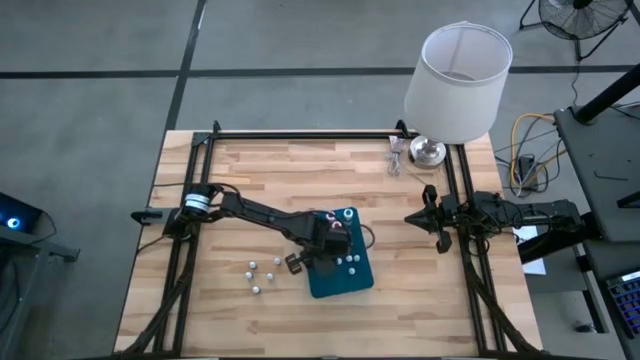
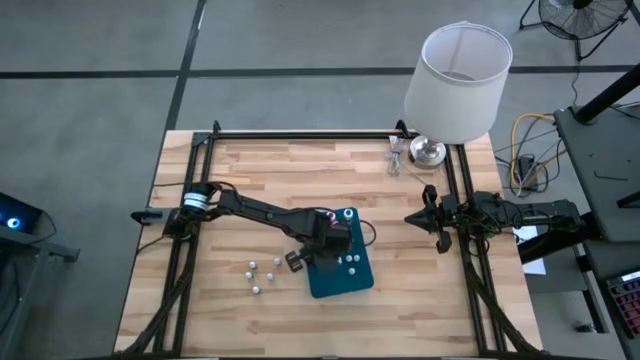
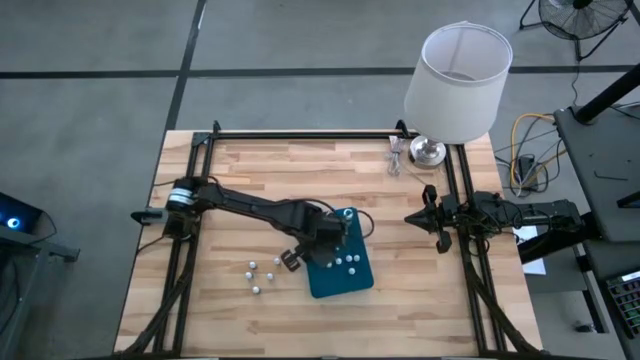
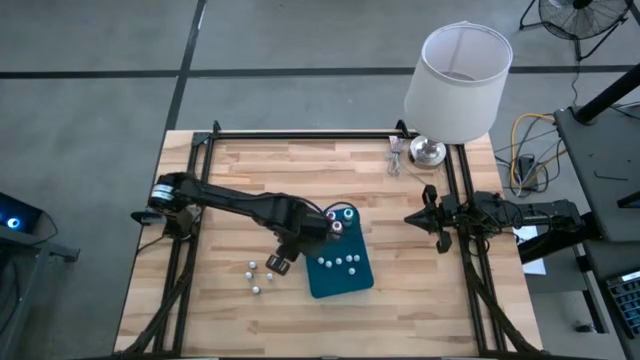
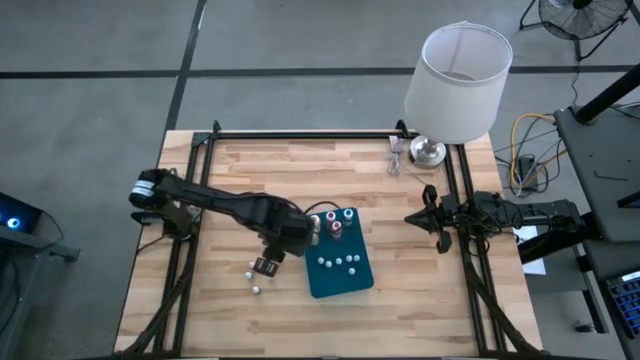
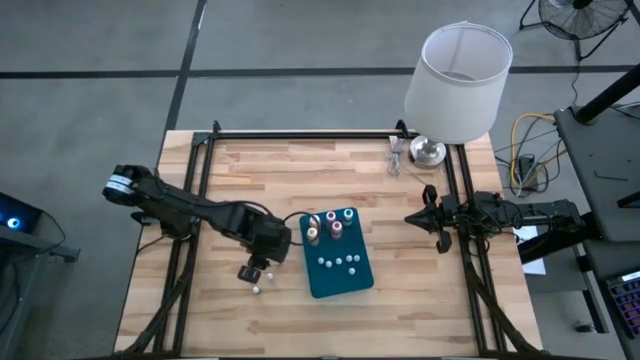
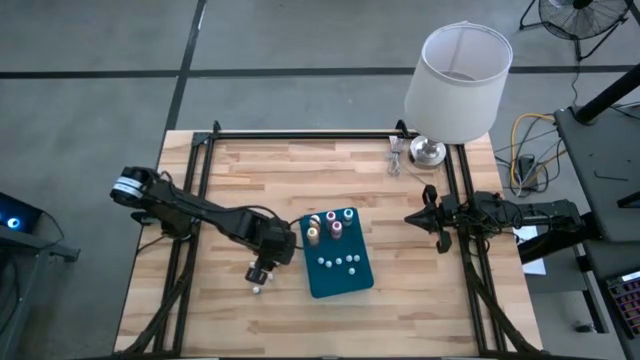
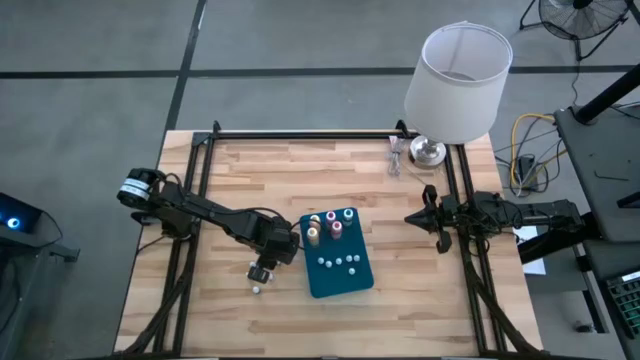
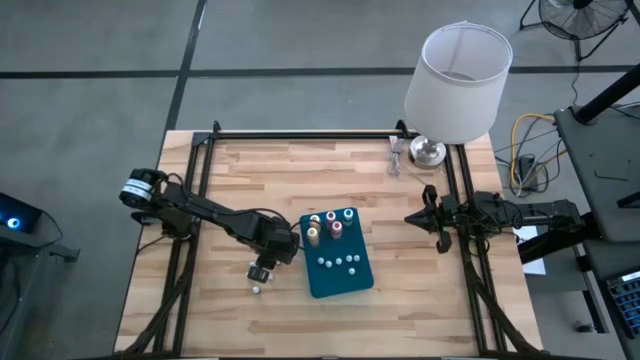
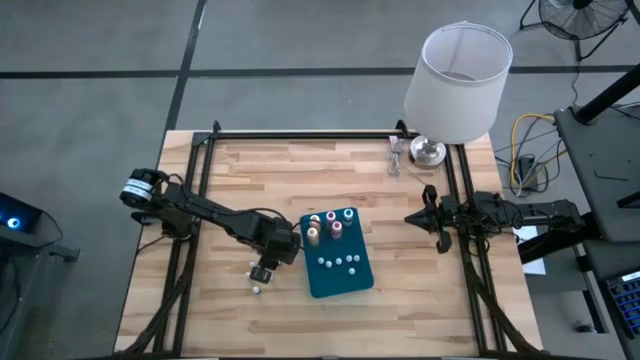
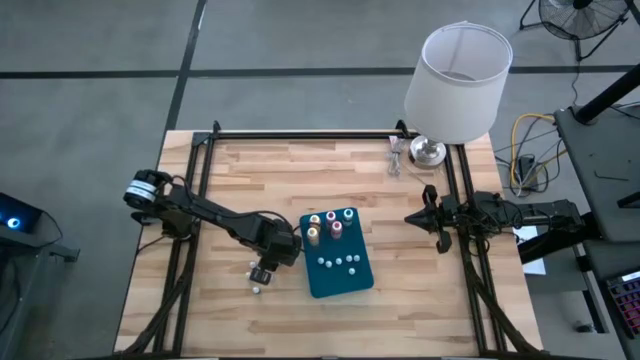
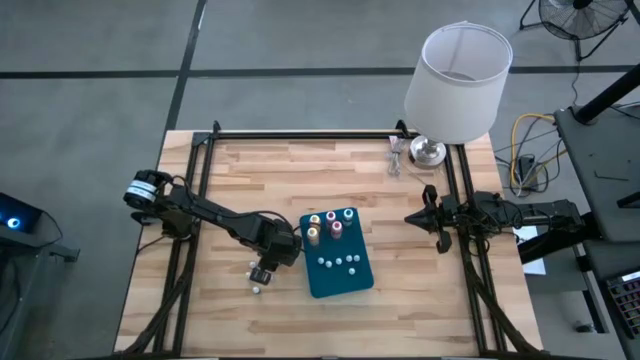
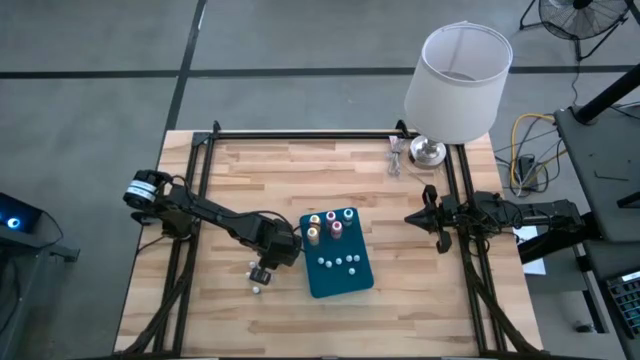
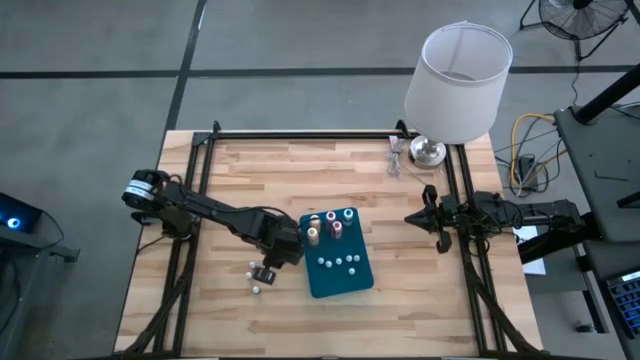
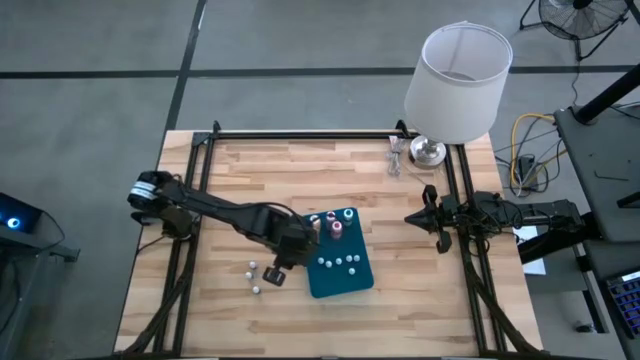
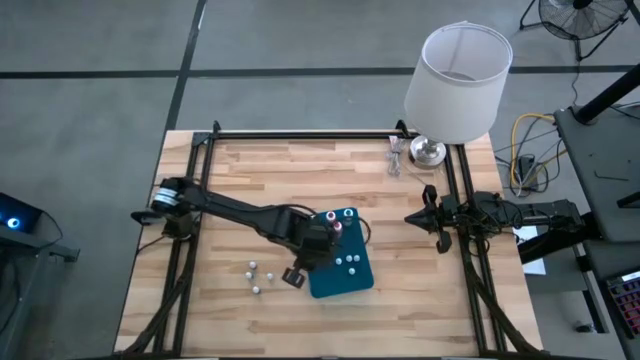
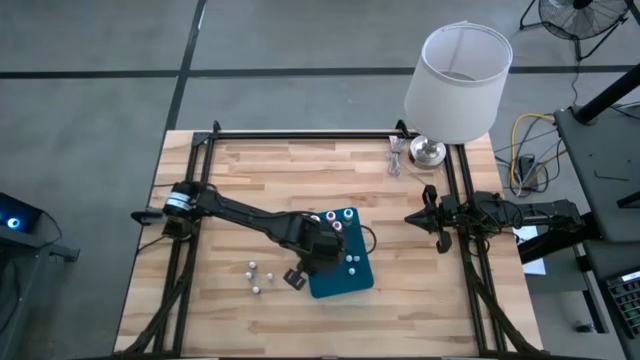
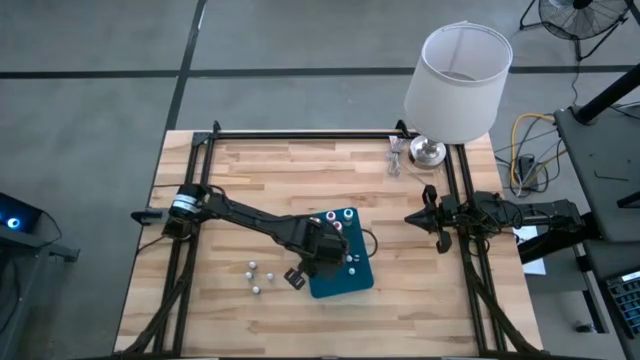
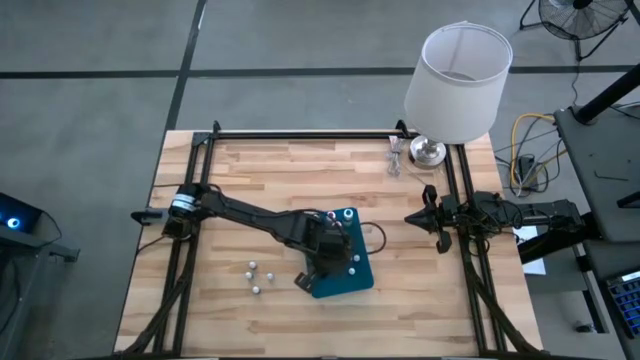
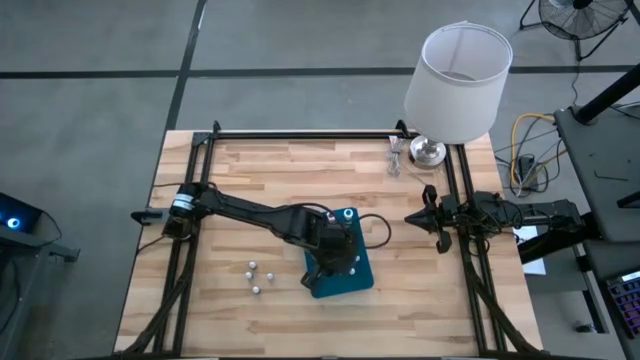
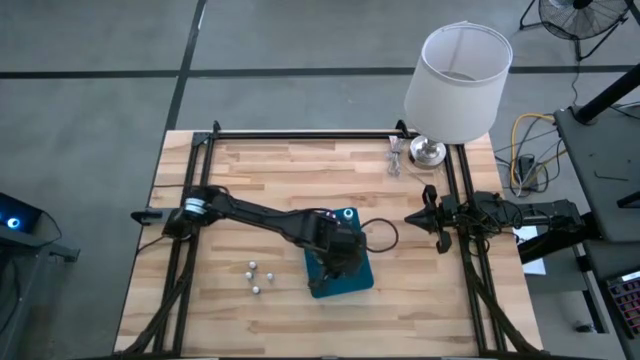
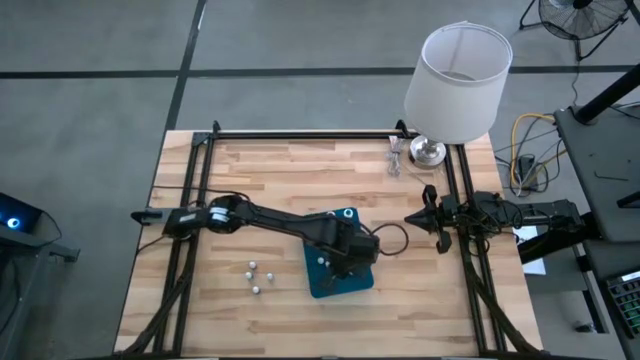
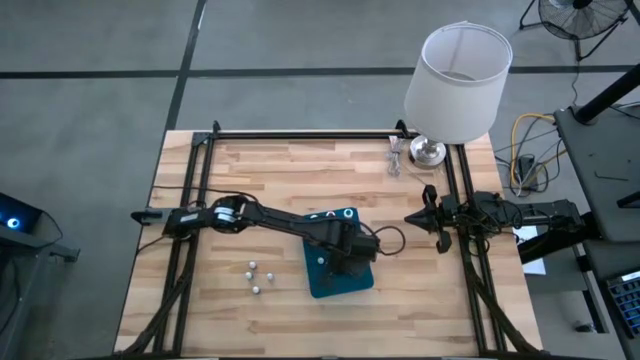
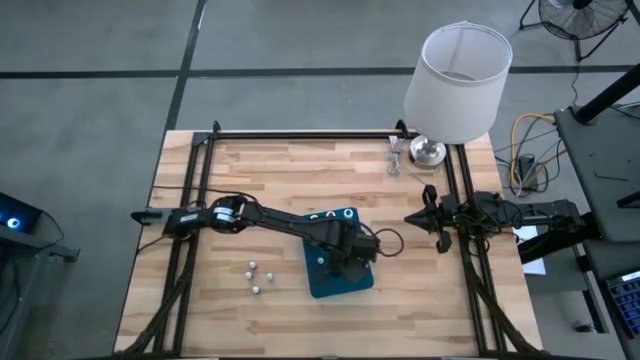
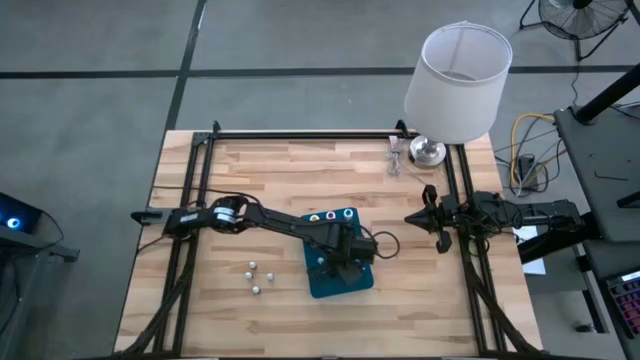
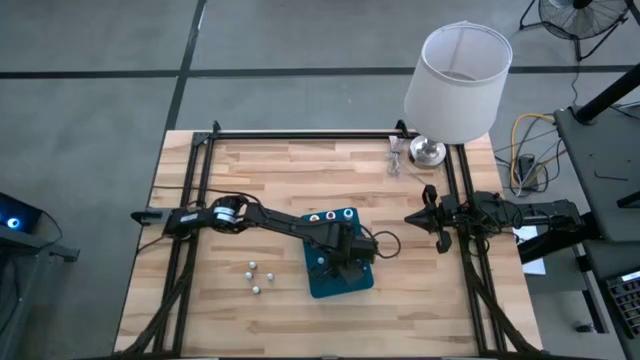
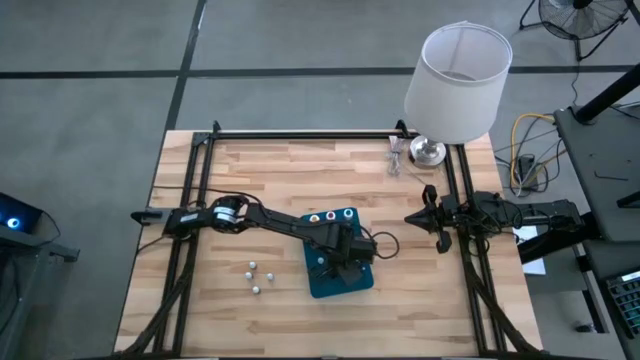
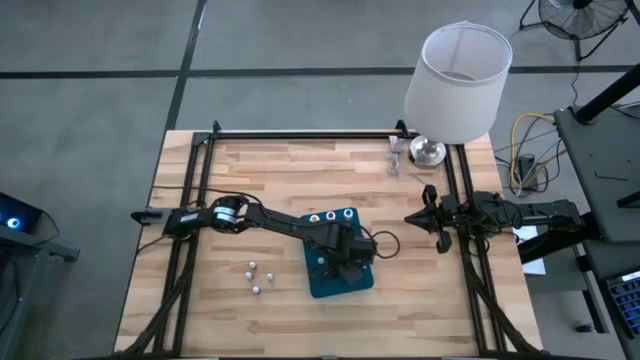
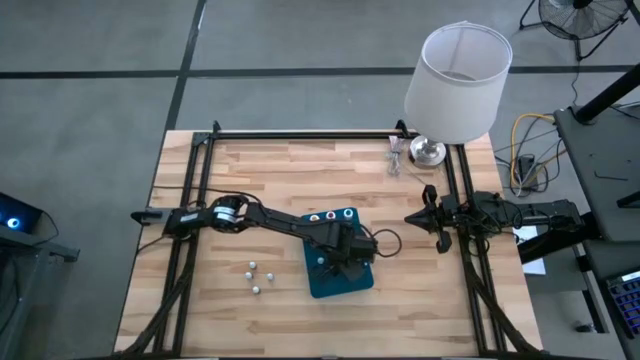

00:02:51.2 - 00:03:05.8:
Task: Pick & Place food coloring
Put the top small red food coloring bottle into the blue bin

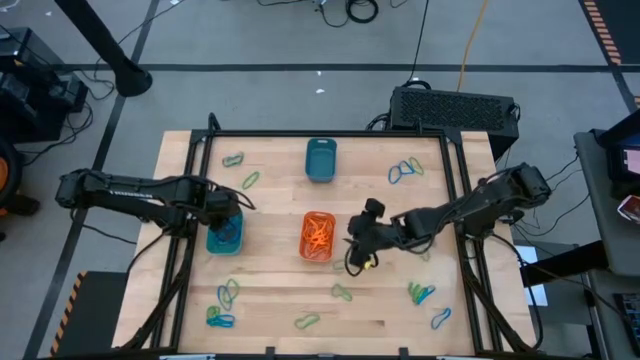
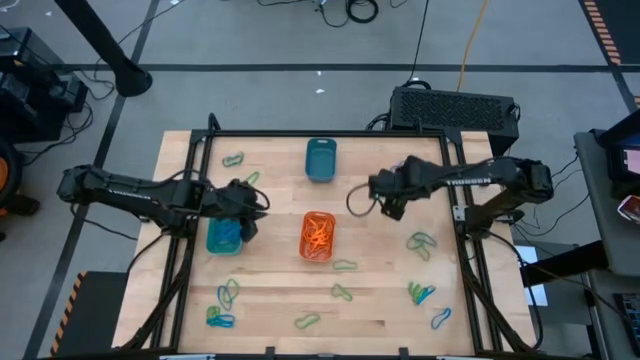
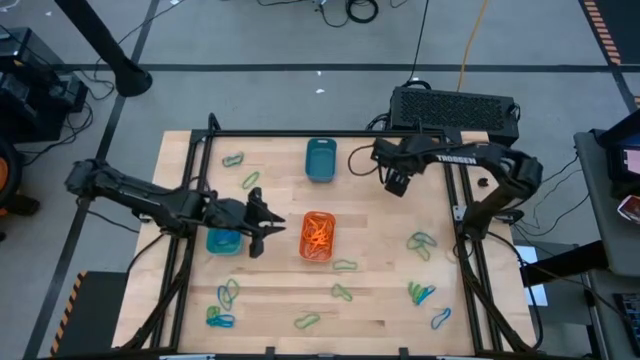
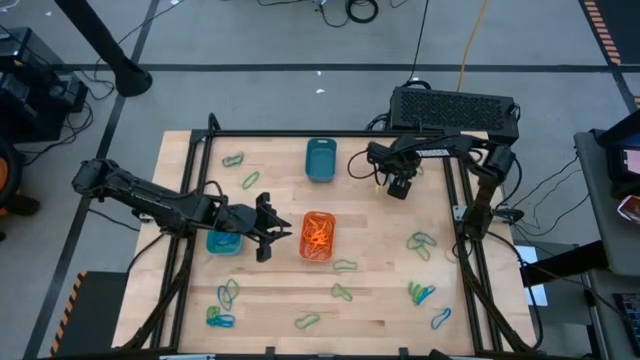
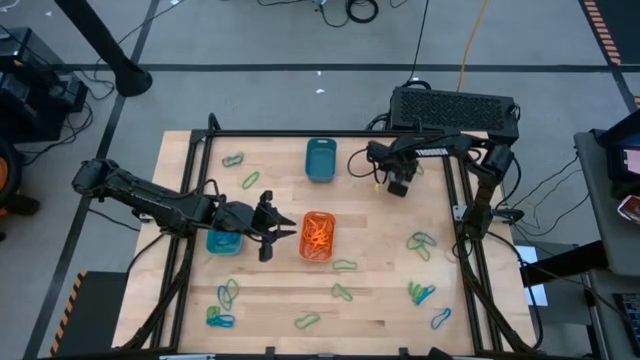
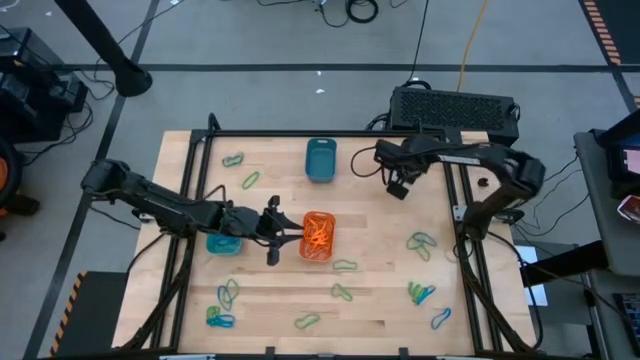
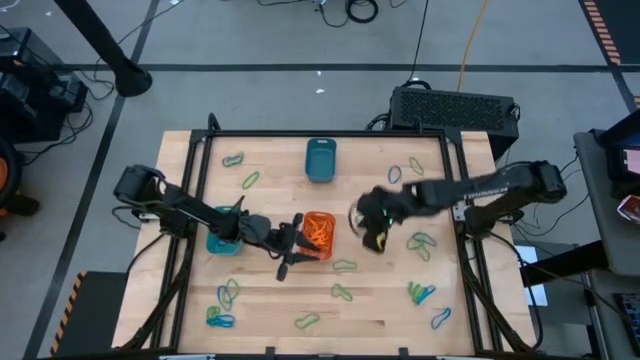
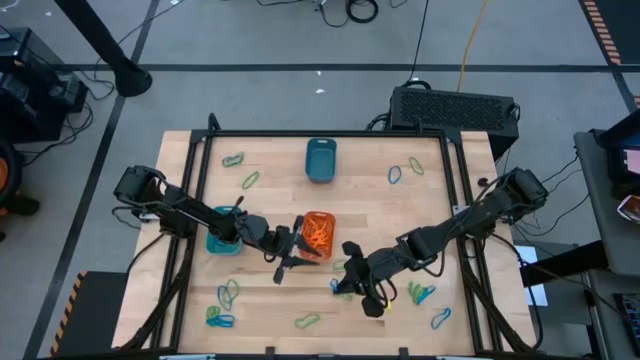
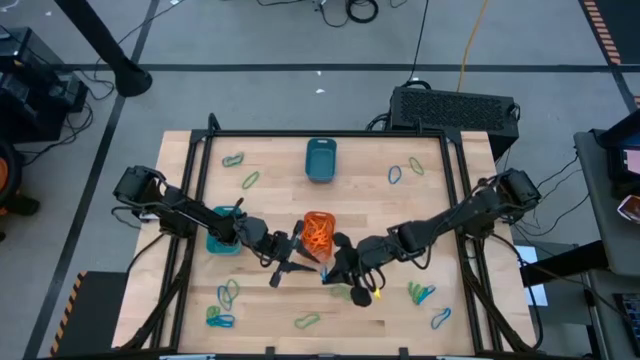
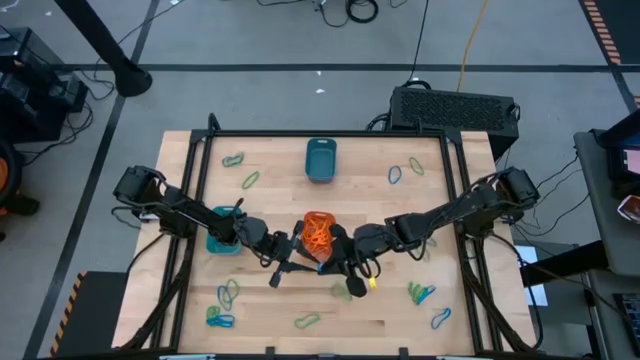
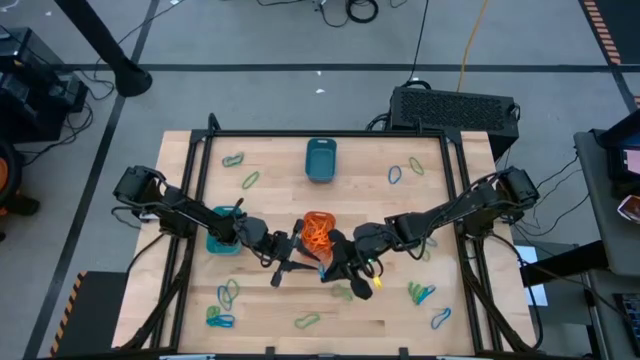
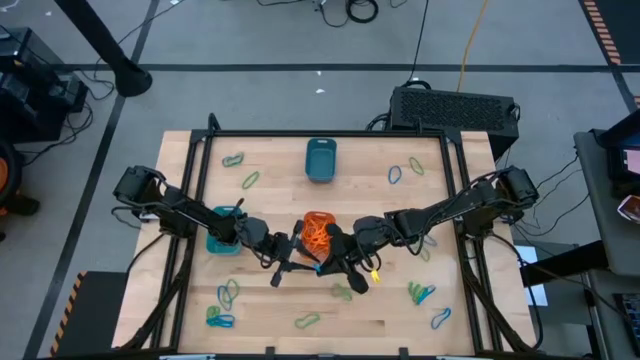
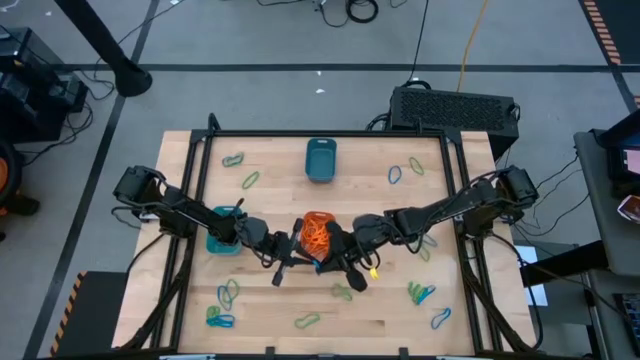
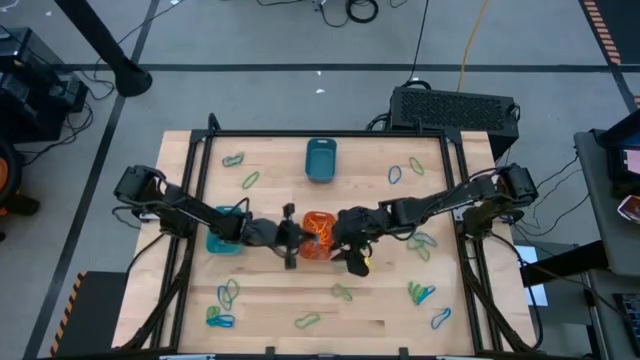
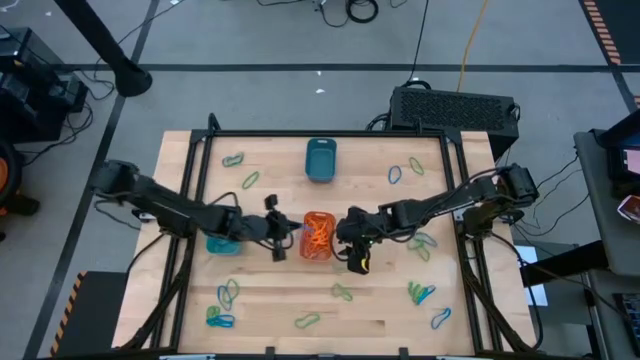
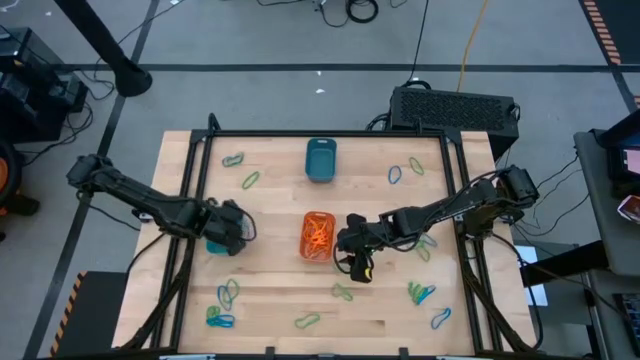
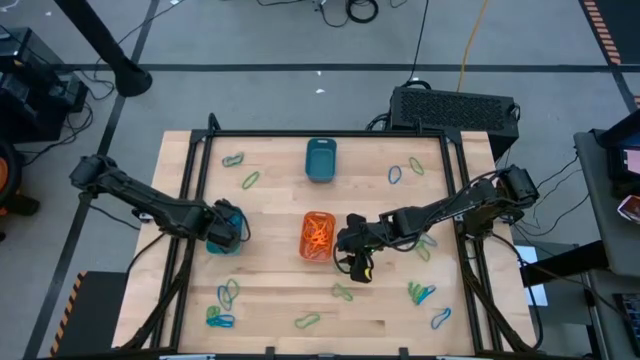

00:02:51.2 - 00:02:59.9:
Task: Sort rubber bands into baskets
Put the blue rubber band into the green bin
